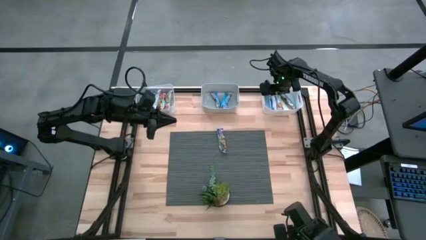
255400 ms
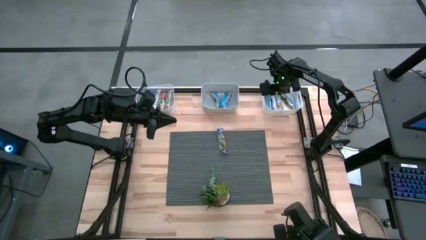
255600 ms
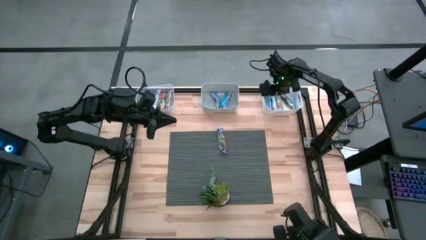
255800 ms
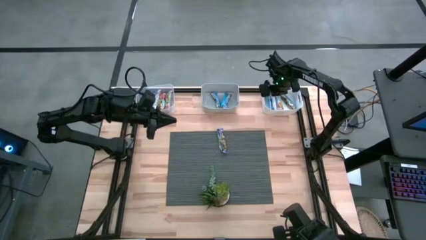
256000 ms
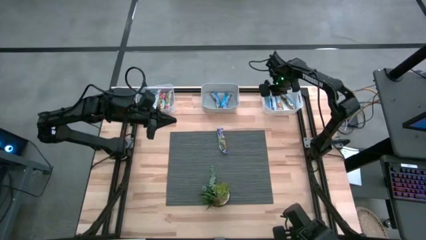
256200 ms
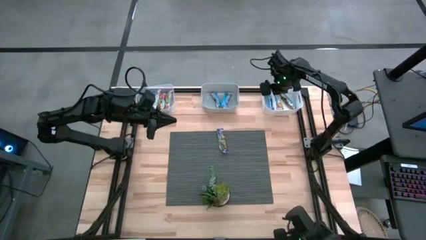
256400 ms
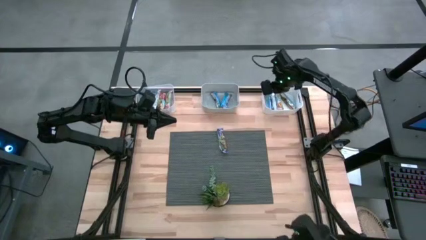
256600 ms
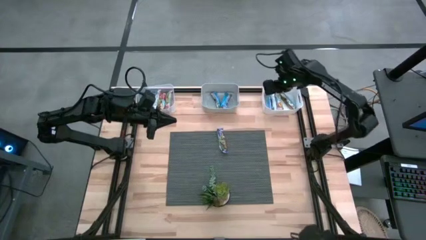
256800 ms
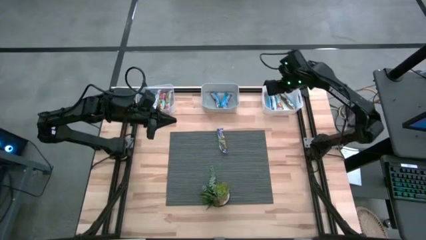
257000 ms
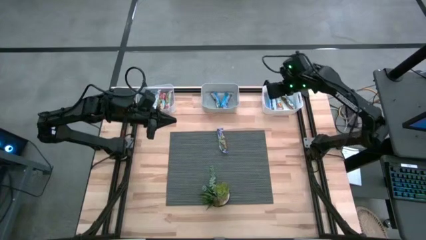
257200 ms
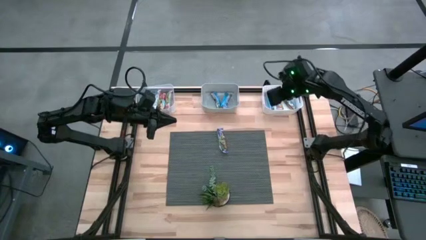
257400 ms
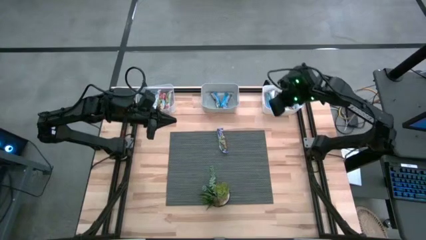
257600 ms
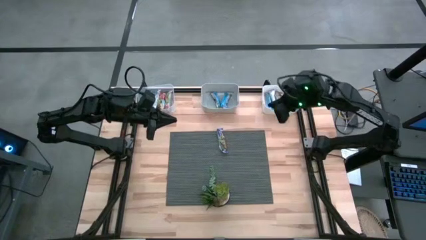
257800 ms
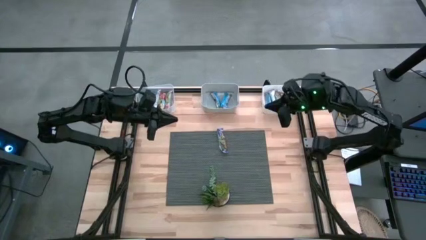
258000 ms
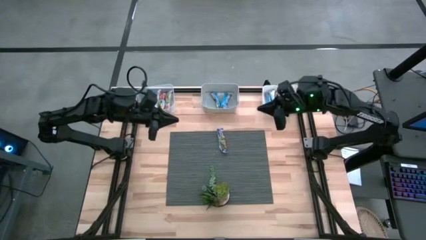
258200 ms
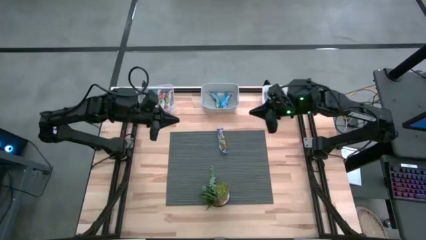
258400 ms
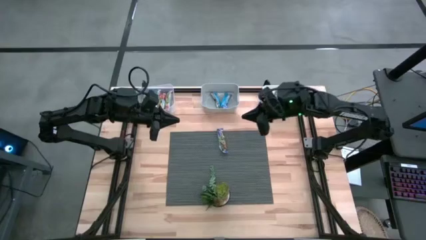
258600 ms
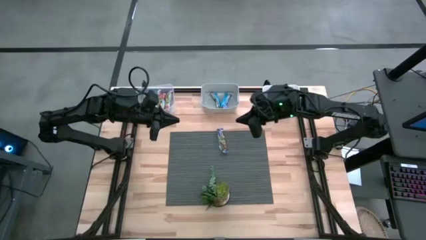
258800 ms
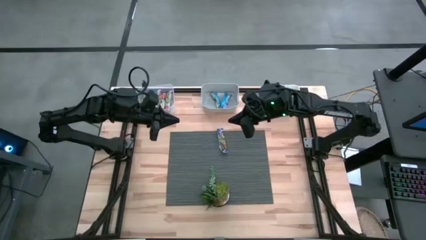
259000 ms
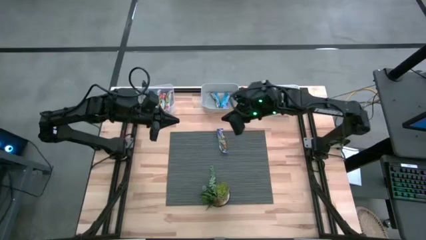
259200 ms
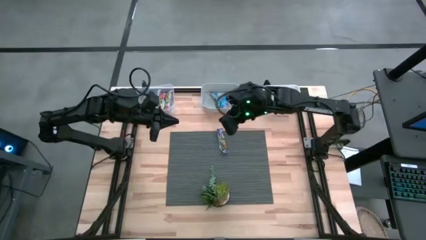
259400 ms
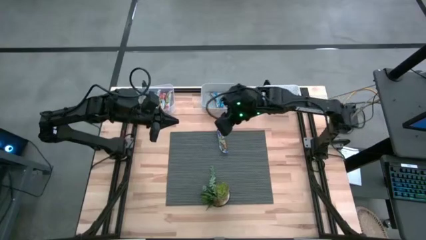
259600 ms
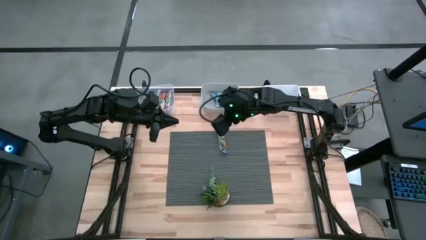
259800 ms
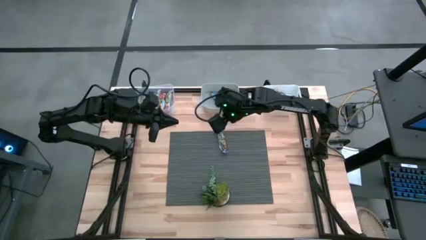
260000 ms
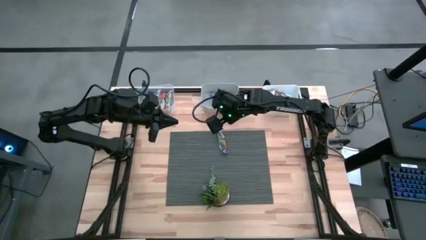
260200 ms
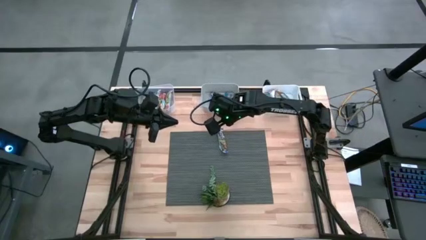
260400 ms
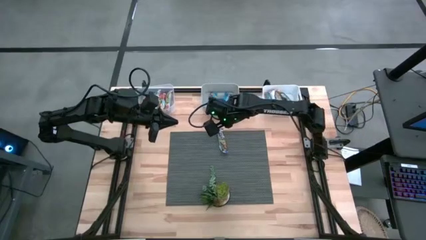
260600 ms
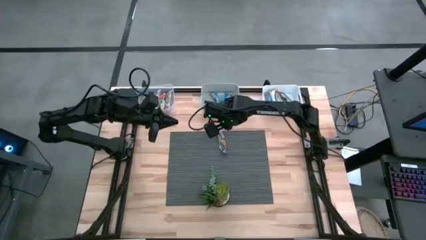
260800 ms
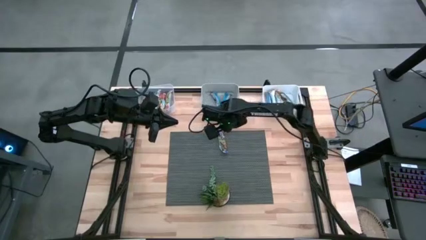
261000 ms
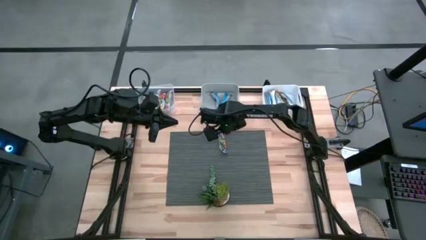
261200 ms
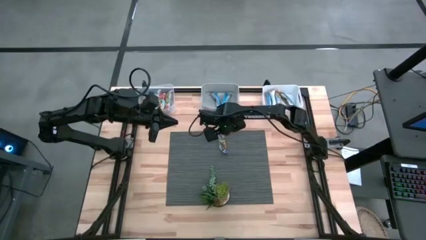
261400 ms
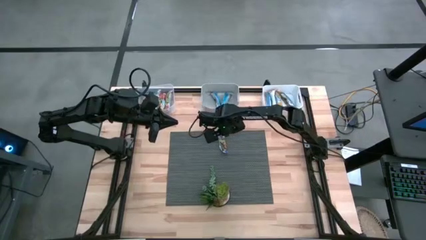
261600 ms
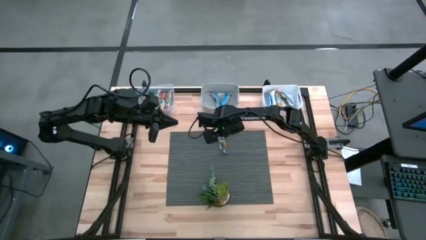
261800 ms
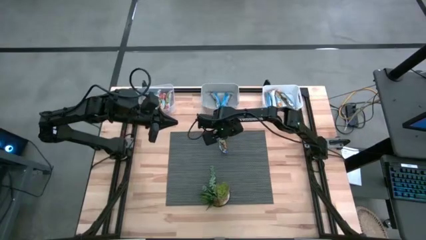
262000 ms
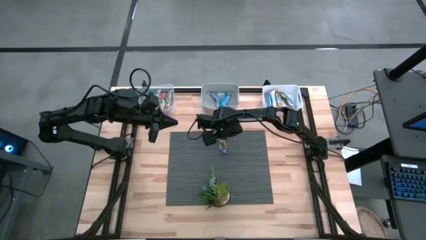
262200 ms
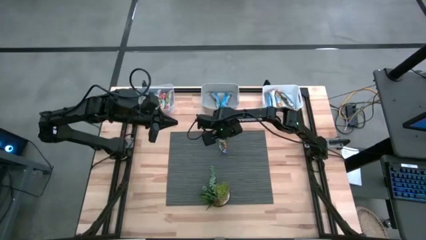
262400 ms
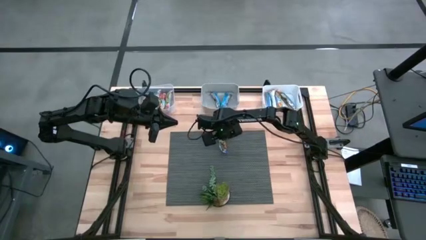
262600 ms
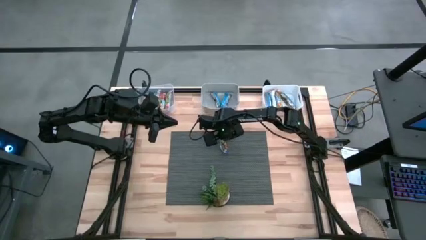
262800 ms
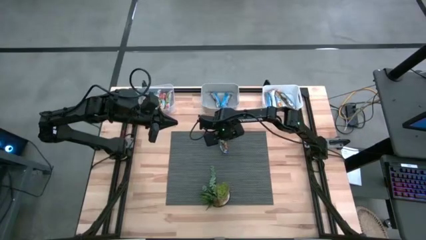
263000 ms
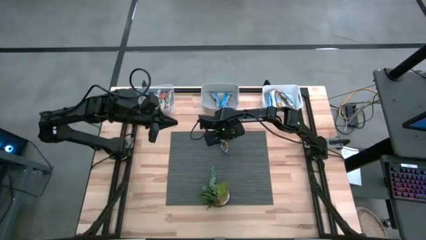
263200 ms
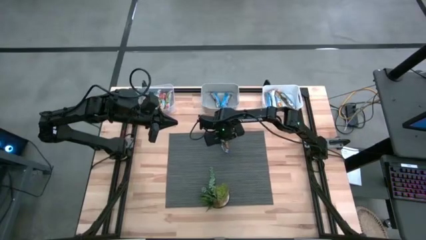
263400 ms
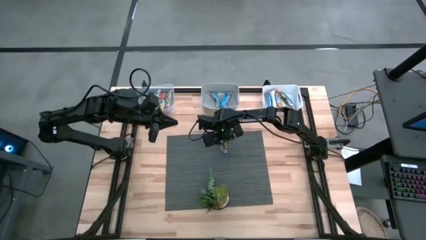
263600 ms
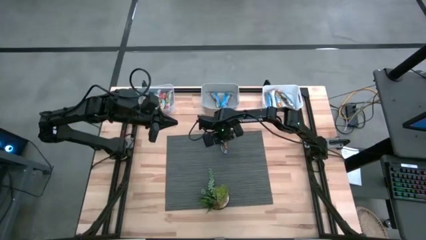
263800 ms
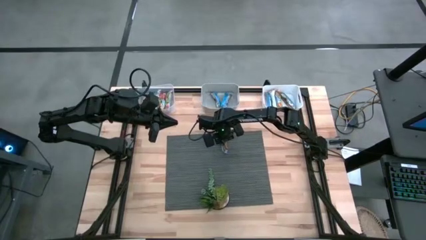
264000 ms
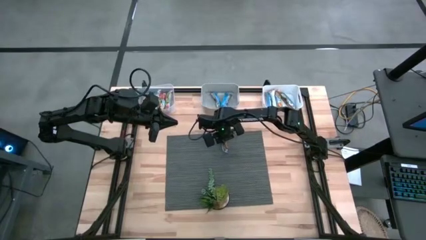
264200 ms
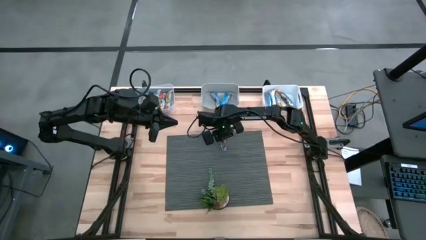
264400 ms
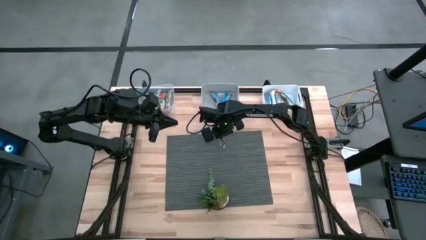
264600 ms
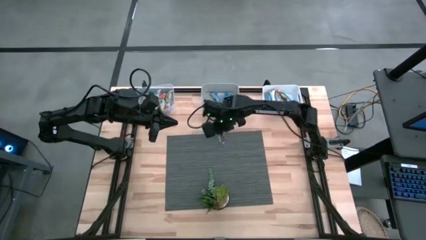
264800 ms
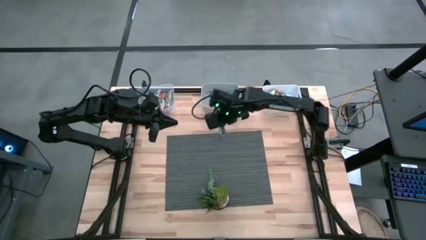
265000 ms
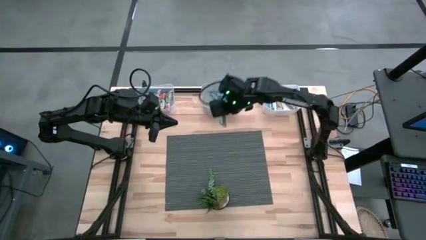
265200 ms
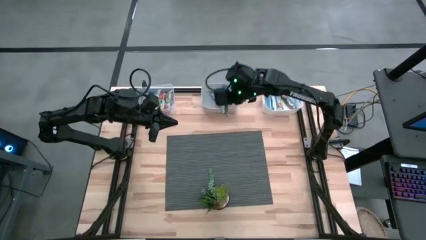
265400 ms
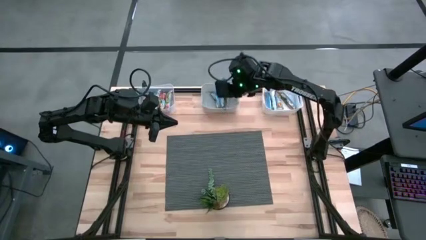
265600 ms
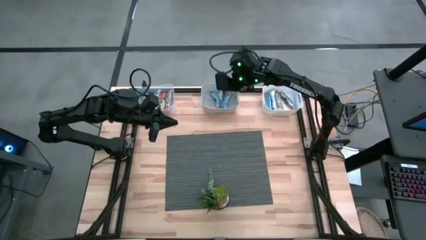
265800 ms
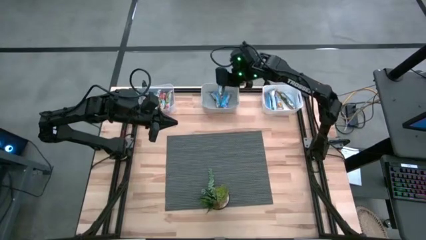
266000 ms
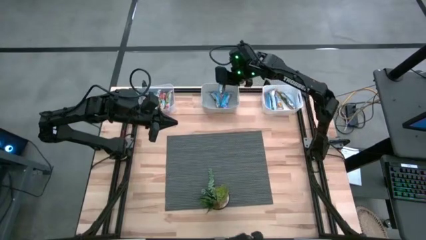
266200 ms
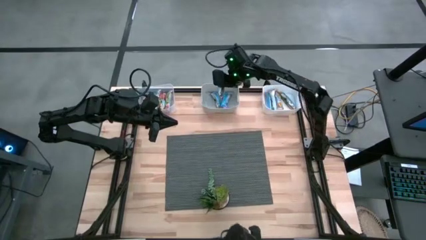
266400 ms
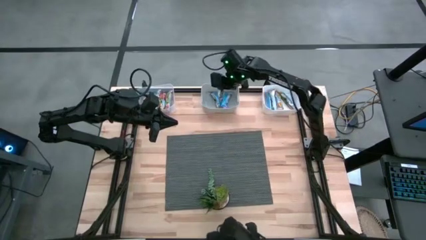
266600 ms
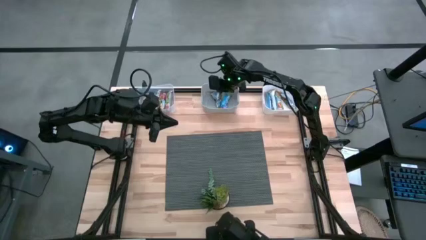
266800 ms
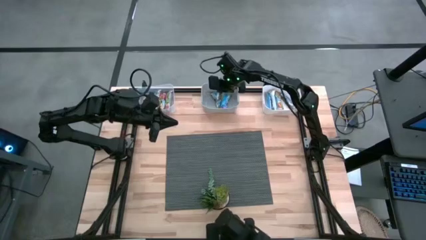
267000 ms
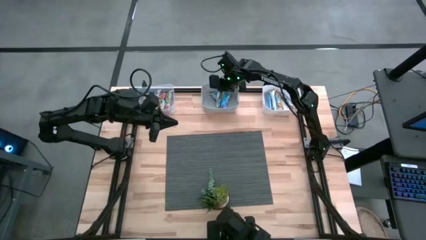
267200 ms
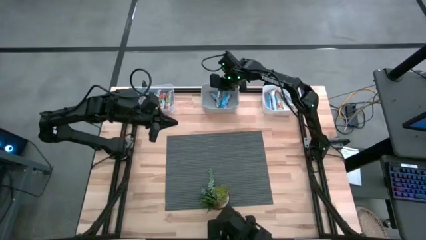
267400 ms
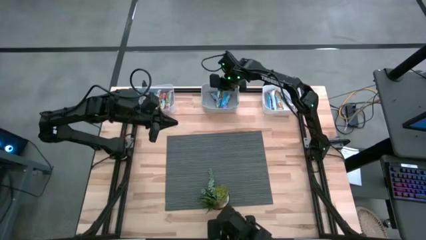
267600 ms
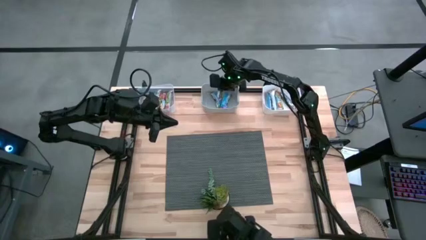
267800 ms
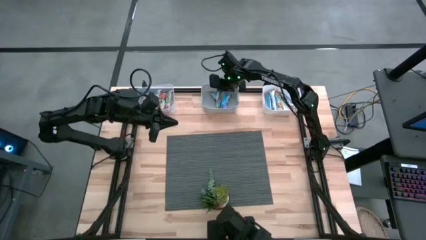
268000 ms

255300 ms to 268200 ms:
Task: Pick and place Granola Bars by type
Put the blue granola bar into the gray bin

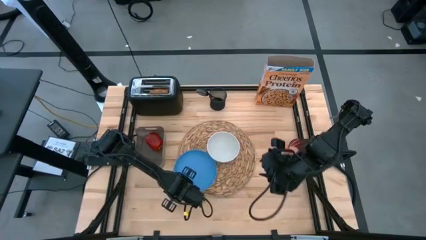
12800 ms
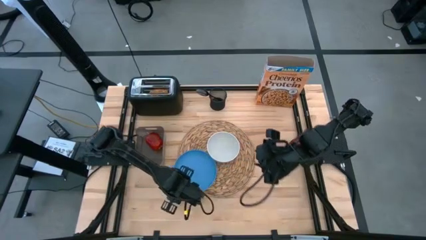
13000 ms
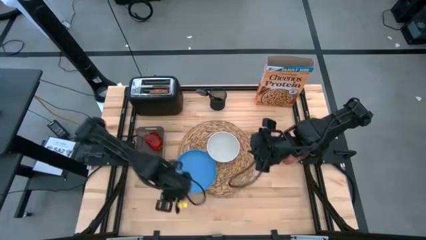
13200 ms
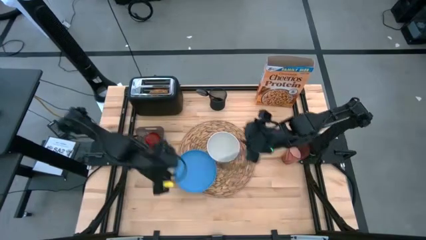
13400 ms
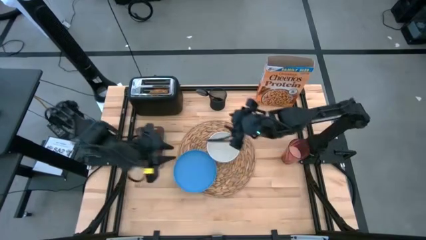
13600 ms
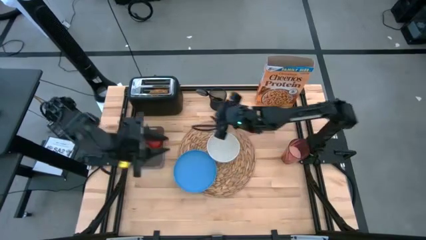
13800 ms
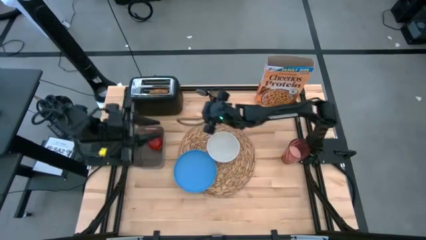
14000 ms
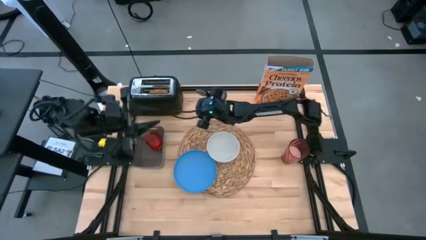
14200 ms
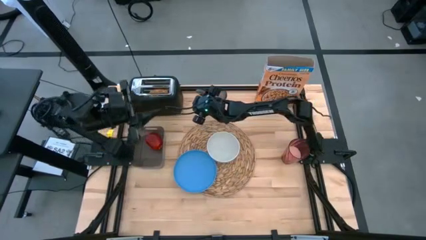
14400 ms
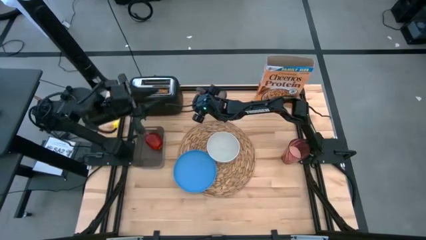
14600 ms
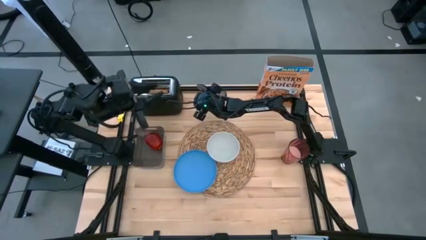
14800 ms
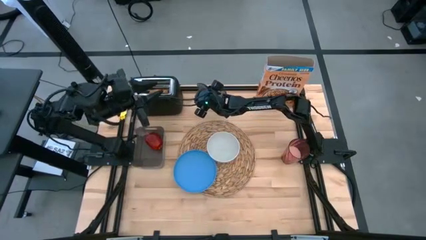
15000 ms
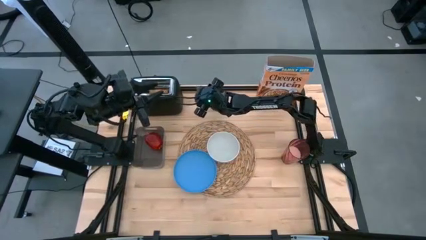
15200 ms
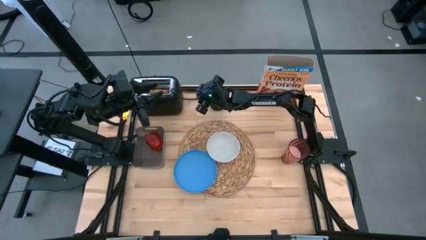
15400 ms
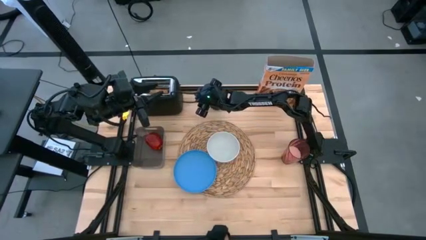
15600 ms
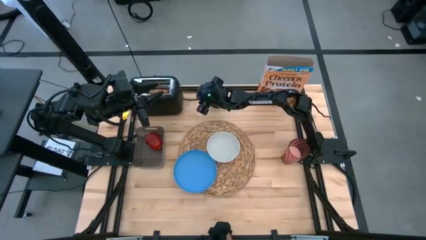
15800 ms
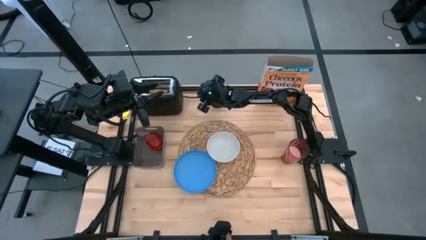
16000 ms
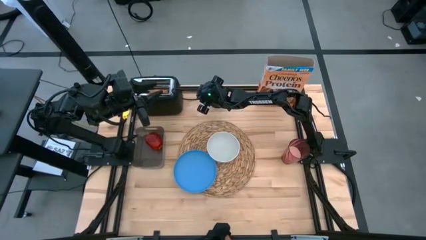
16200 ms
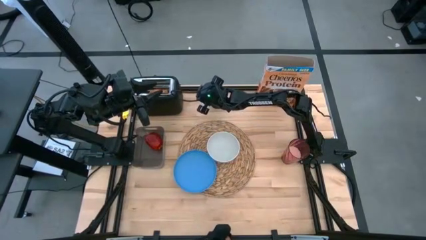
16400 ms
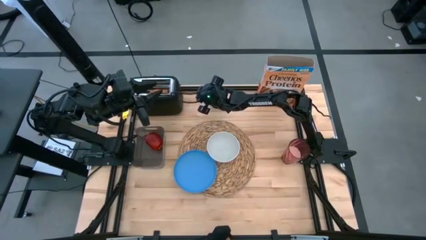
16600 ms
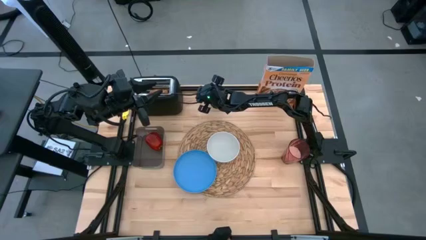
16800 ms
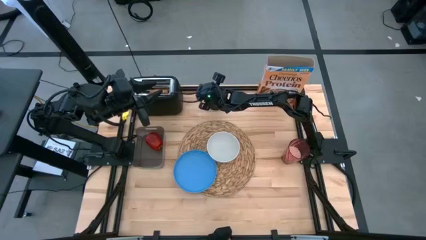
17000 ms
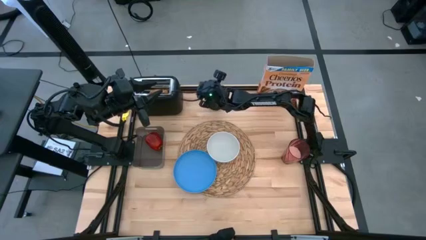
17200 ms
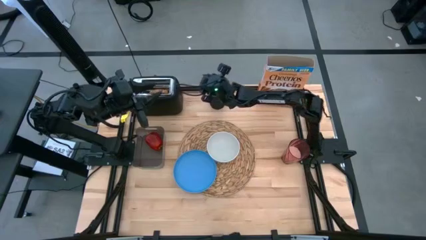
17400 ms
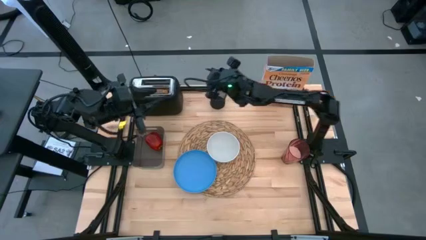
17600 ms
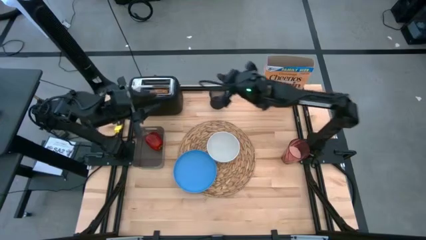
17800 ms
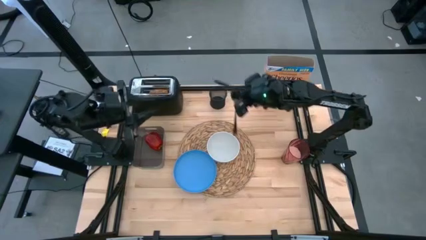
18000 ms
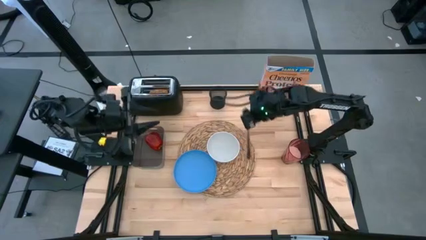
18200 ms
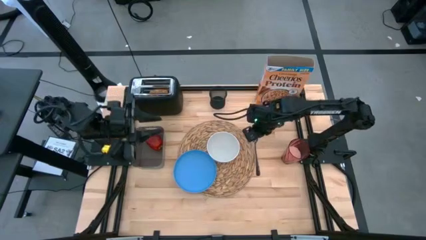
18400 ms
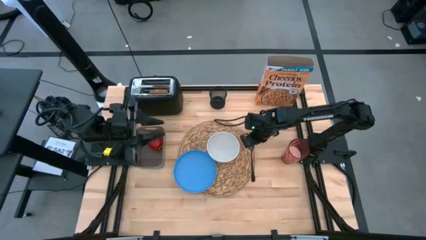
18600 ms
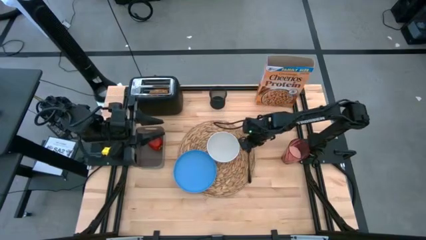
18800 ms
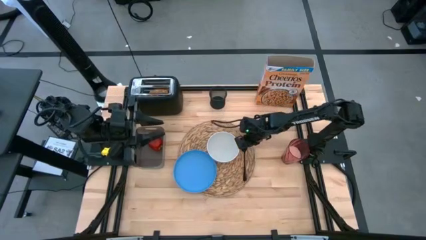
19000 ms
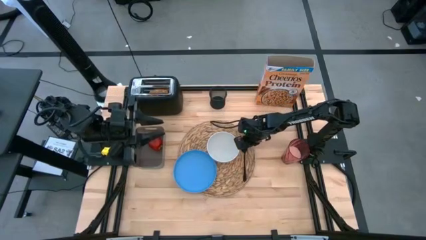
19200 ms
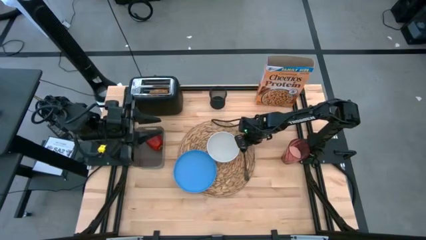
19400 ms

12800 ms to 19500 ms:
Task: Arrange a breakfast setting
Put the black spoon on the brown woven mat
